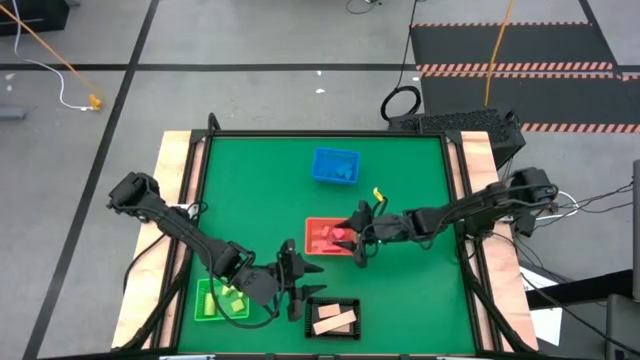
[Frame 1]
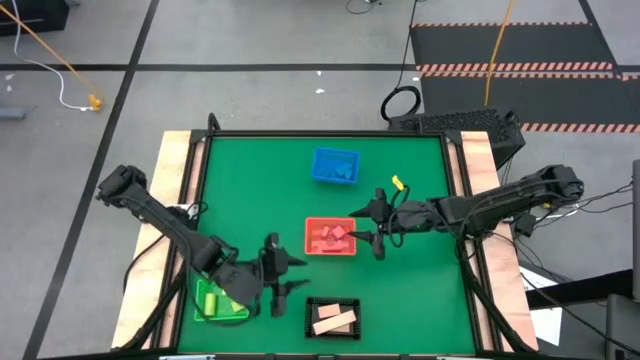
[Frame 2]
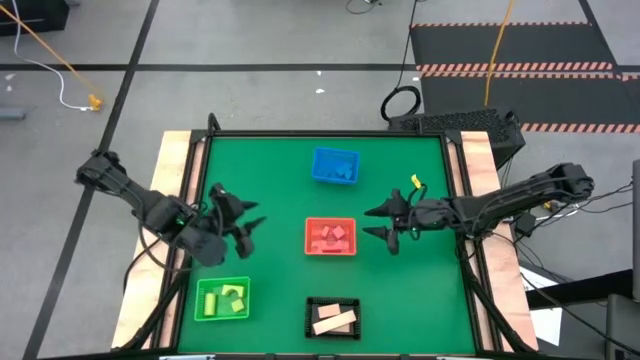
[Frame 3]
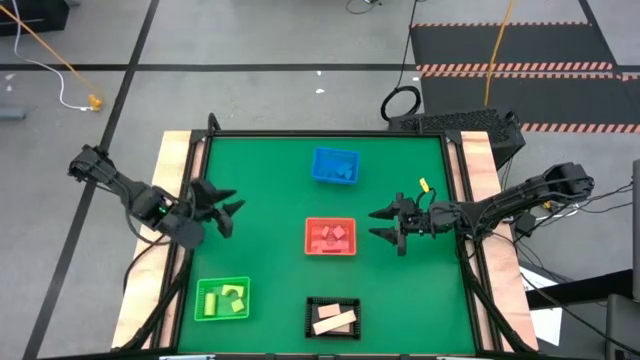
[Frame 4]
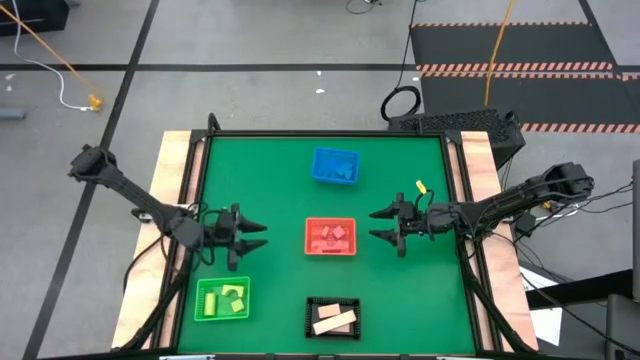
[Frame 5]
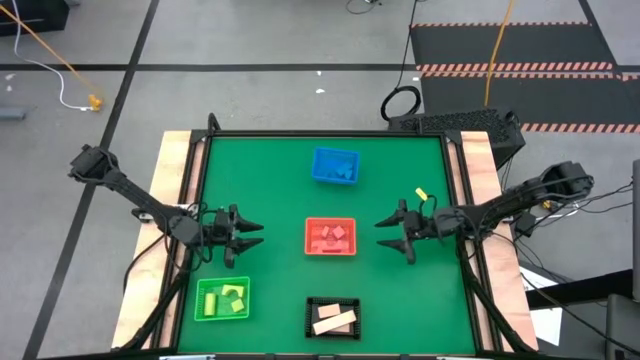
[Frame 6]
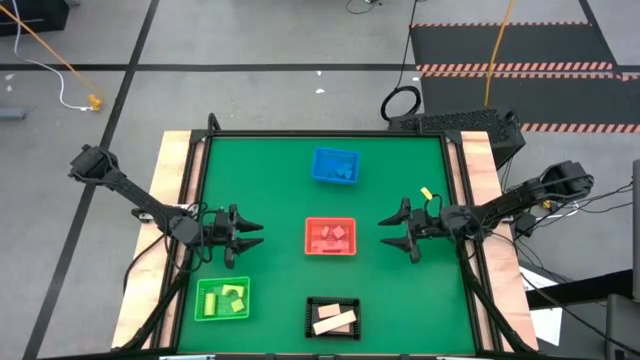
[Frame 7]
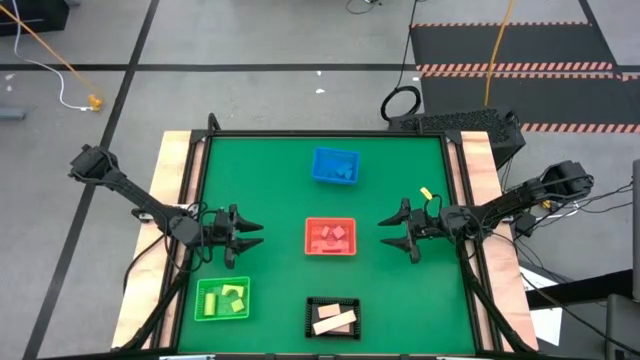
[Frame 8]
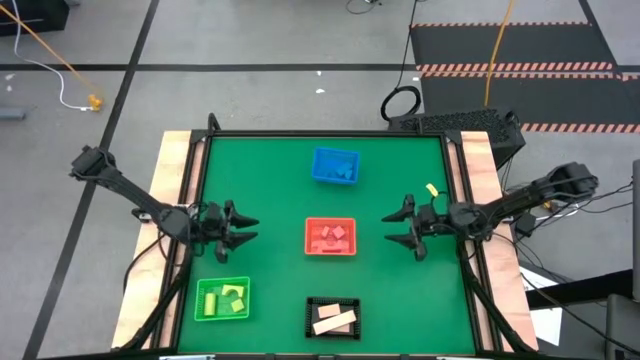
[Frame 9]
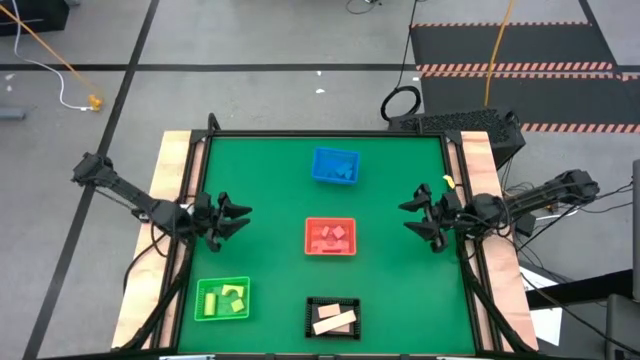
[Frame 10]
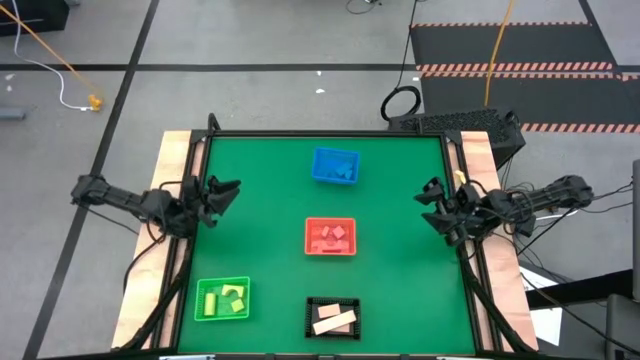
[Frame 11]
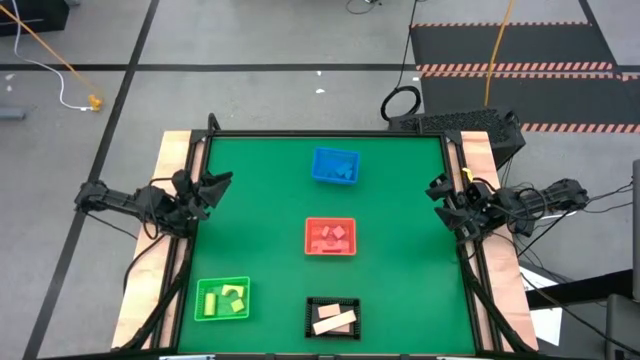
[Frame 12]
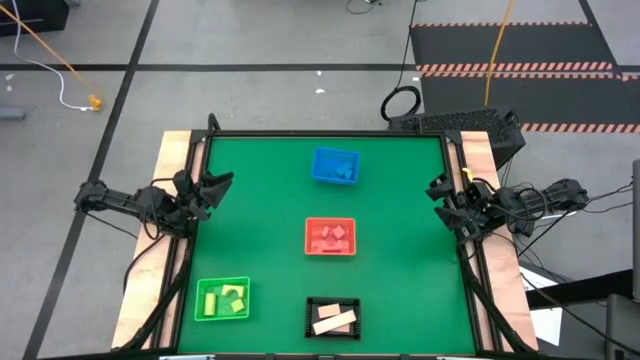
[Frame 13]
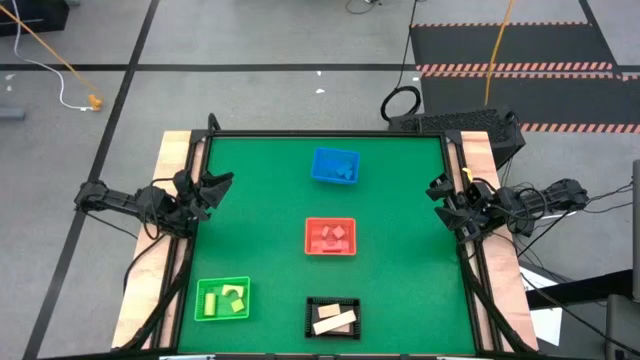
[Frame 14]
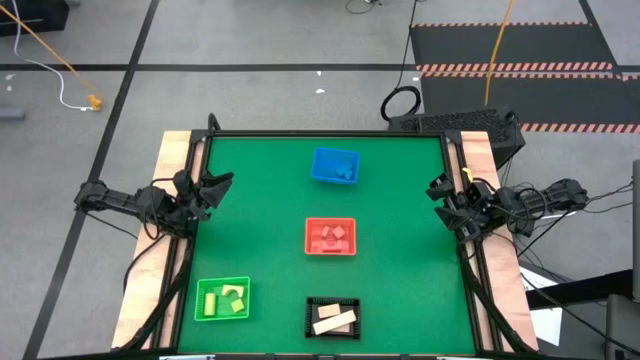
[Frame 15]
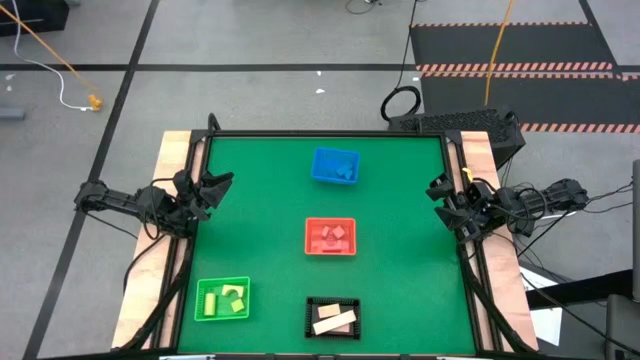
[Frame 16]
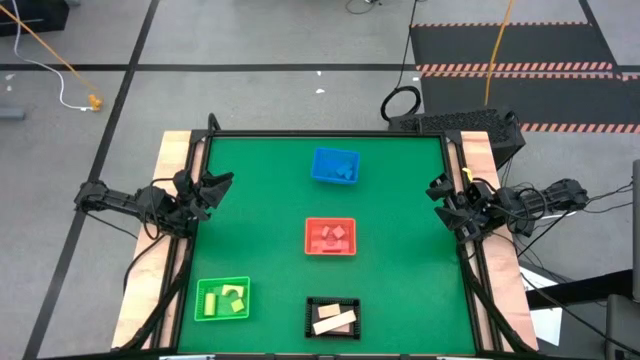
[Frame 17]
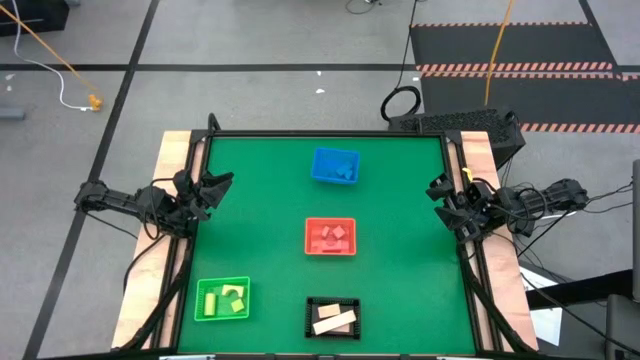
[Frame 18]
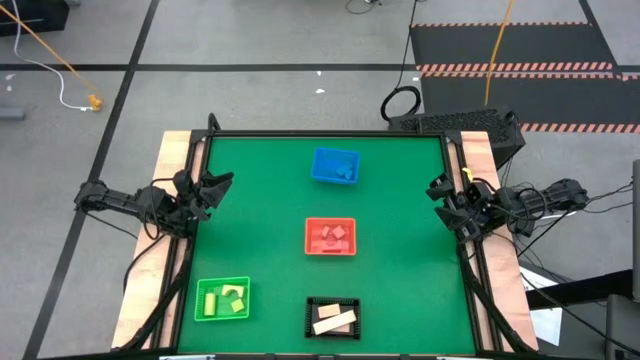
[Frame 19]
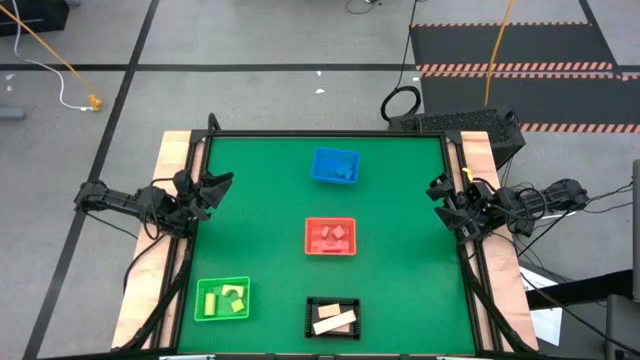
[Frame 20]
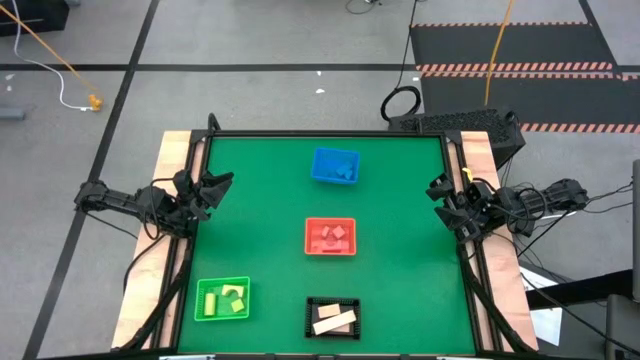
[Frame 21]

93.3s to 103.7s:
Task: Sort & place blocks by color
Return to Home Position

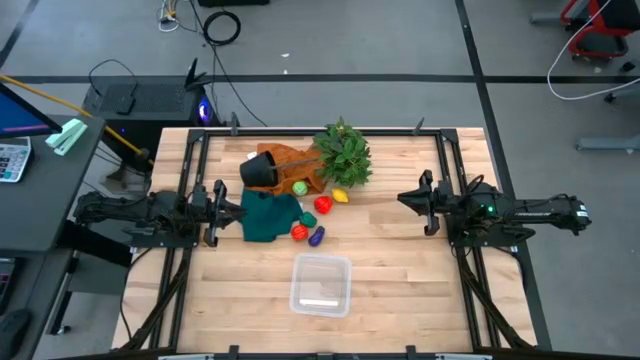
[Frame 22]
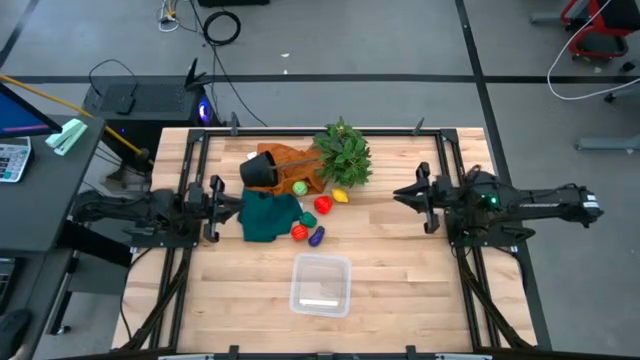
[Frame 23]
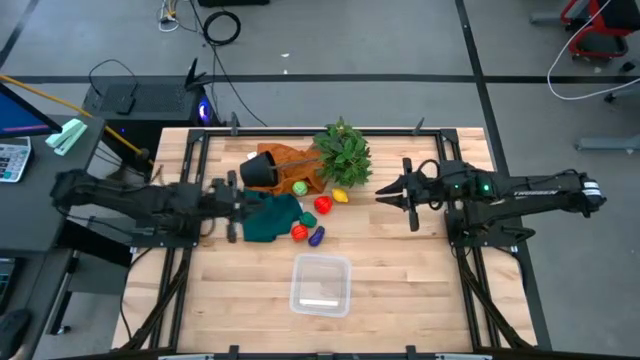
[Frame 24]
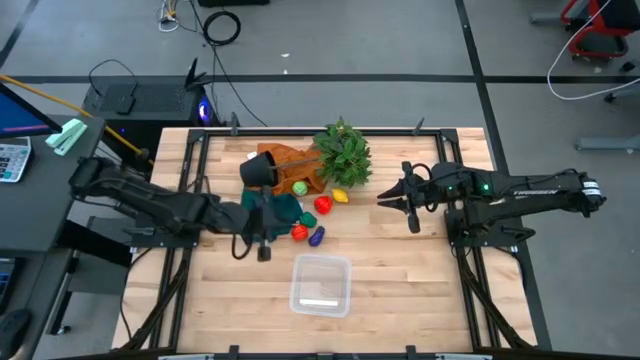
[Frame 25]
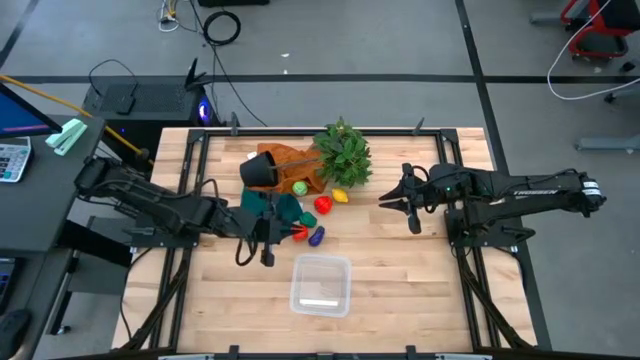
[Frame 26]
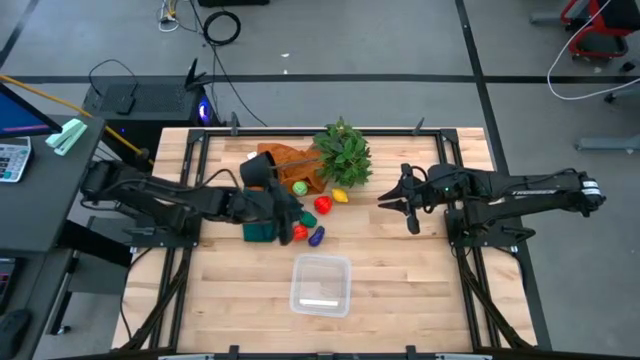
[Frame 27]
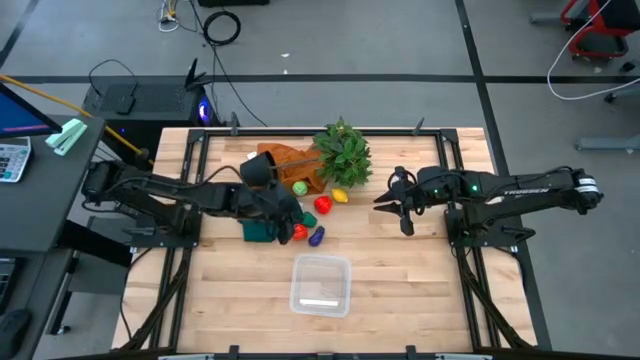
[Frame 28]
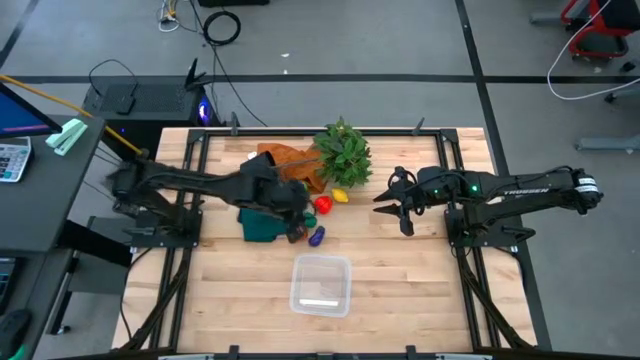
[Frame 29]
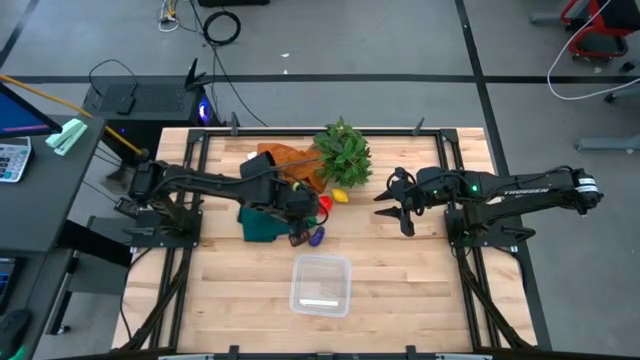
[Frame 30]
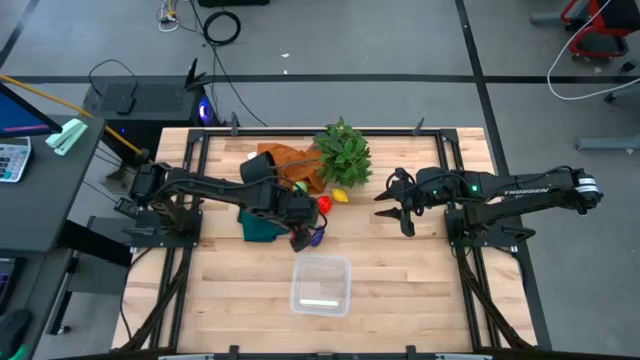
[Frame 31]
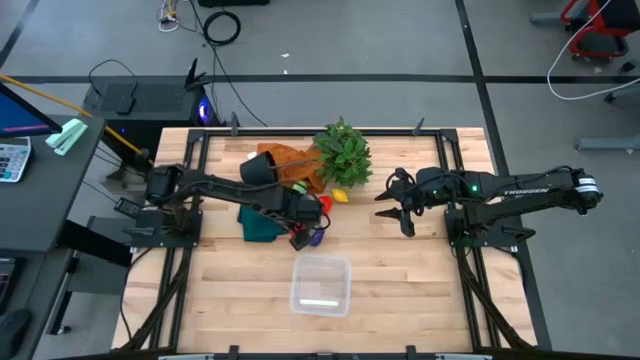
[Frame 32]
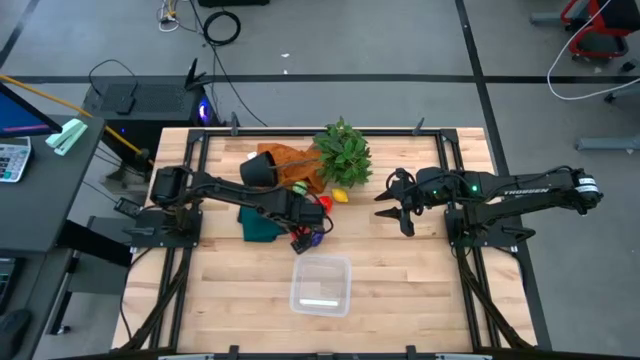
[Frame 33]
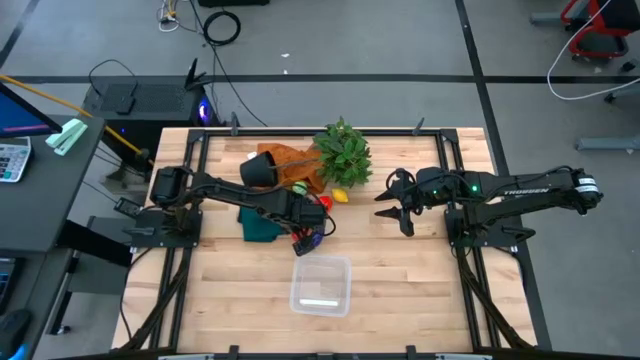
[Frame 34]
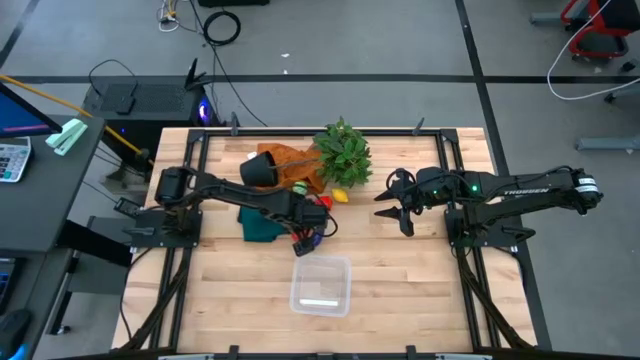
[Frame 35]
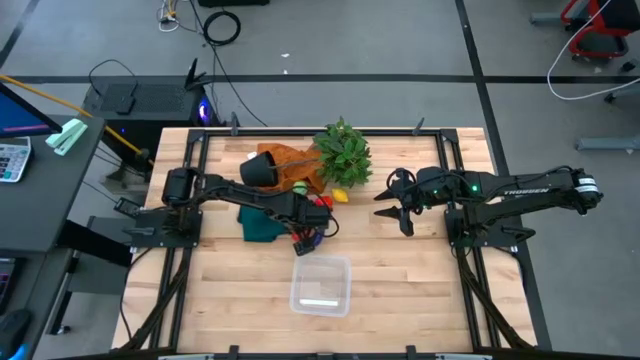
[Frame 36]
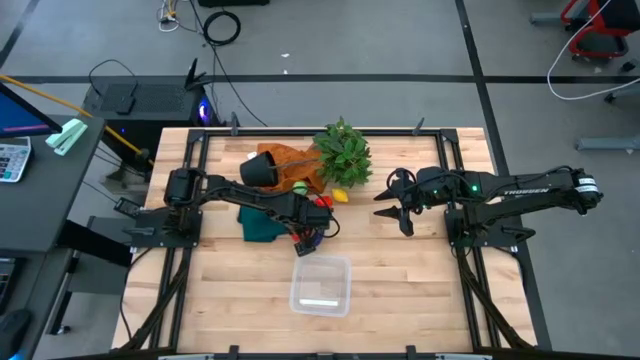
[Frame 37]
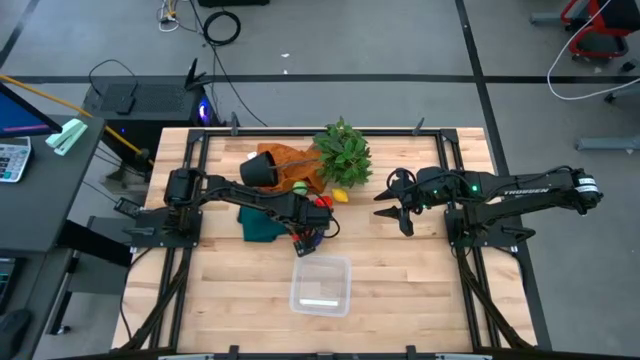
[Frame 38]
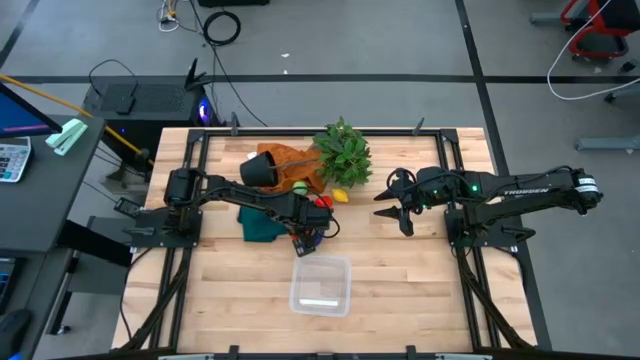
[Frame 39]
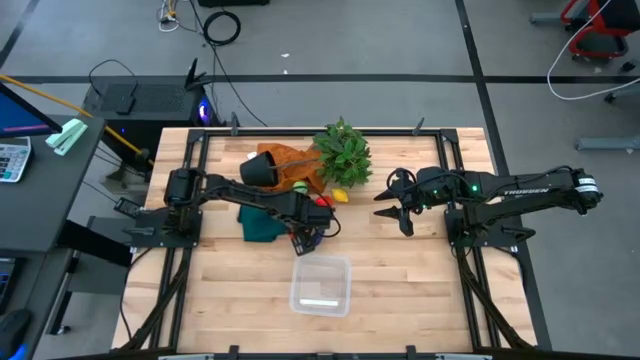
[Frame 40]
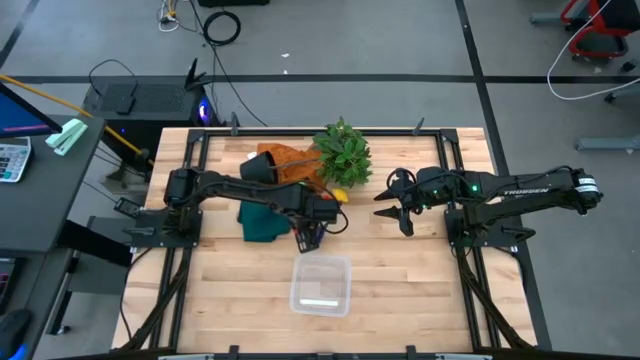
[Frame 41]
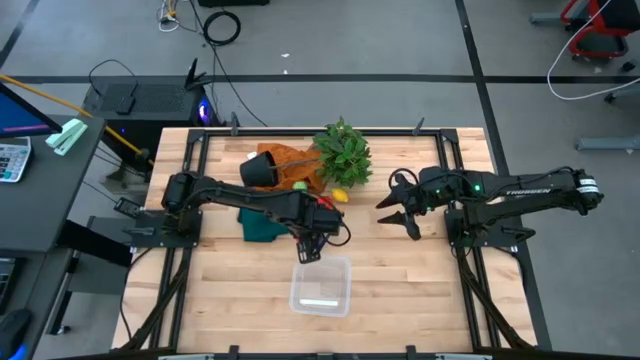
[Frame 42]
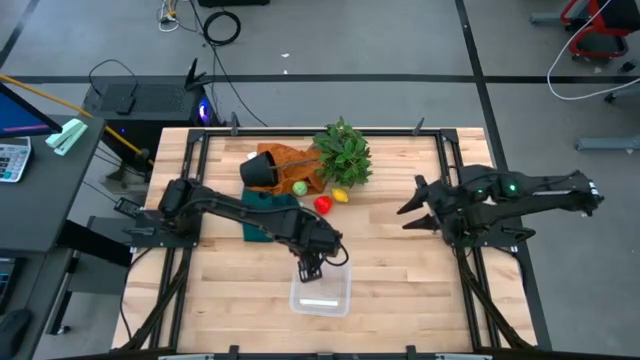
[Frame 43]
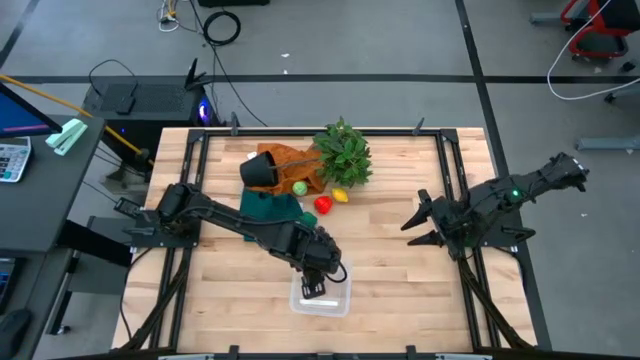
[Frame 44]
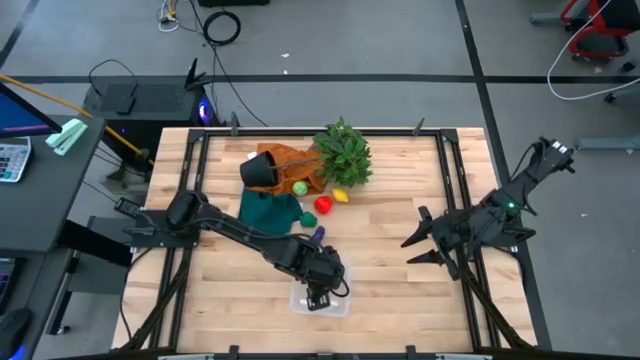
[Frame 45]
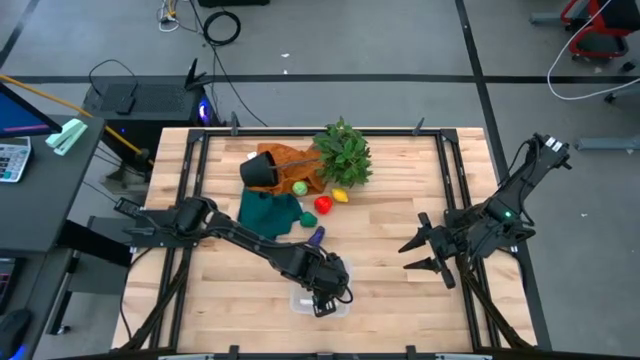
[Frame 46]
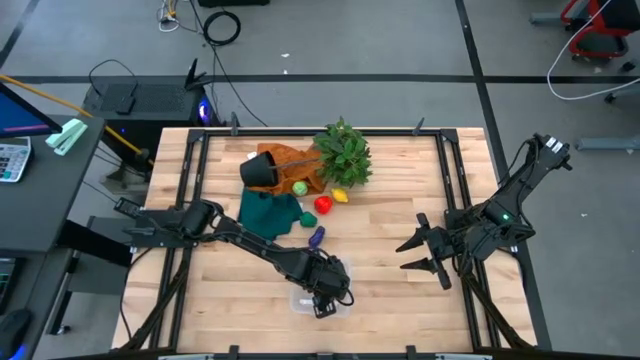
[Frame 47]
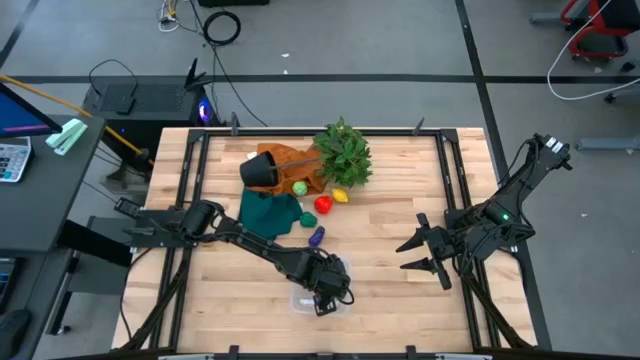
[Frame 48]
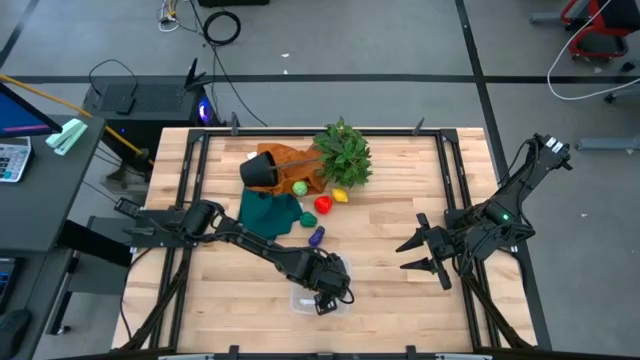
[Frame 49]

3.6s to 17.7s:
Task: Pick and placing Produce into tupperware
Put the red tomato into the transparent bin
